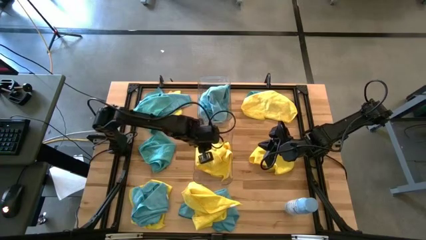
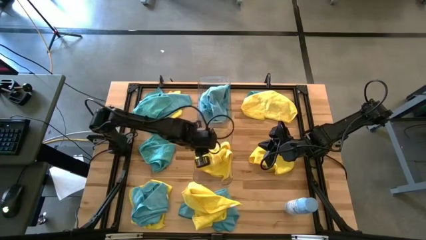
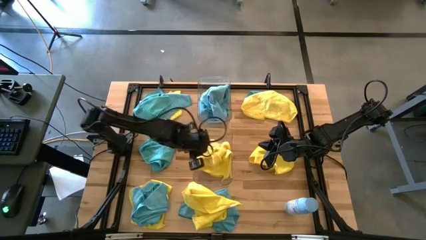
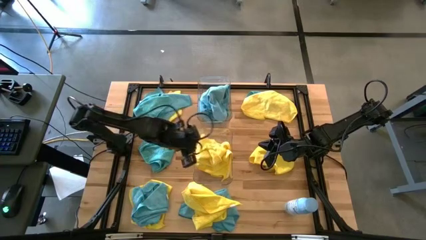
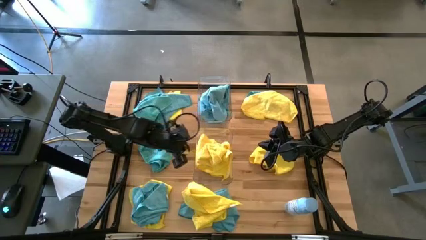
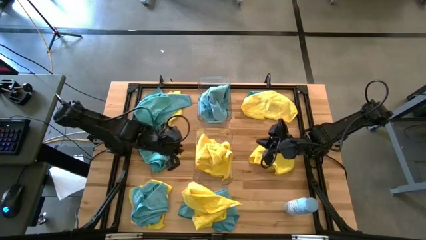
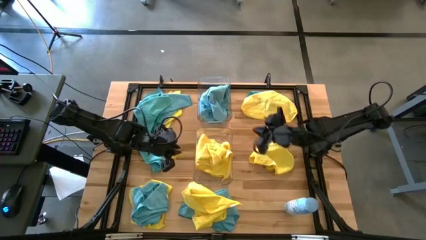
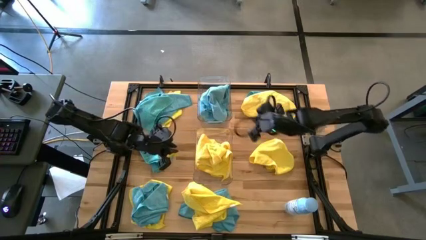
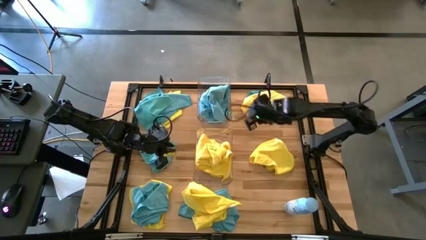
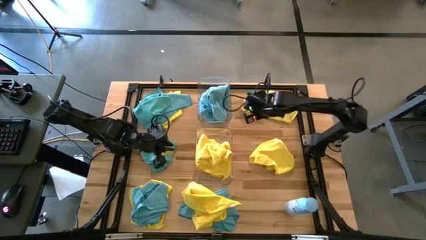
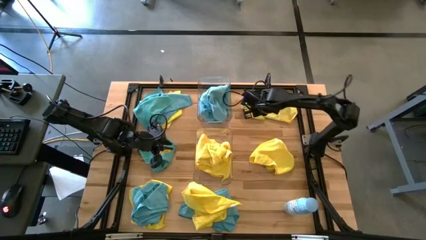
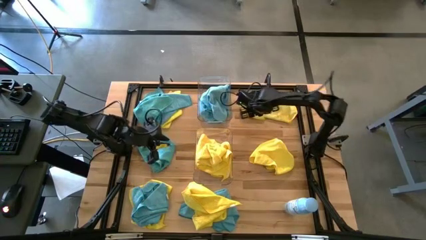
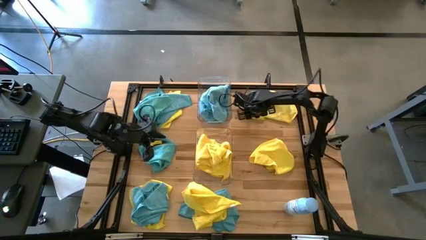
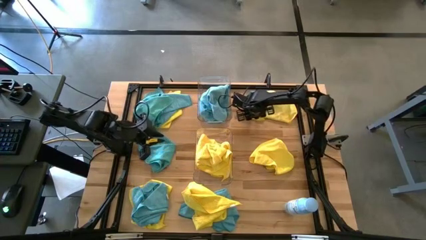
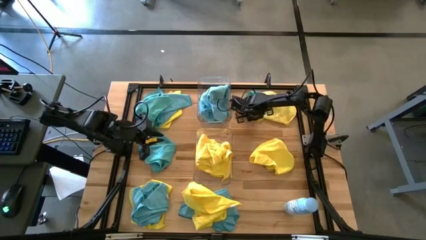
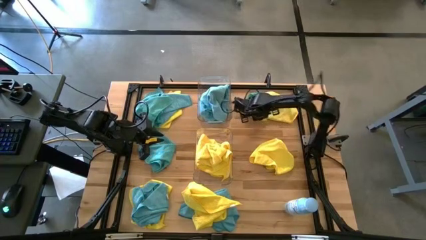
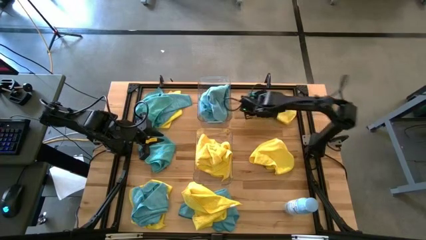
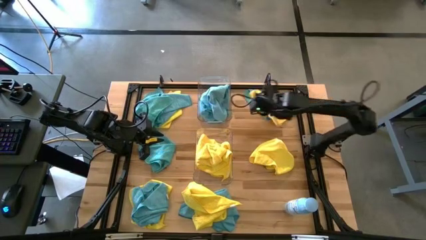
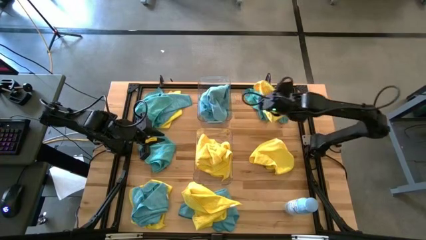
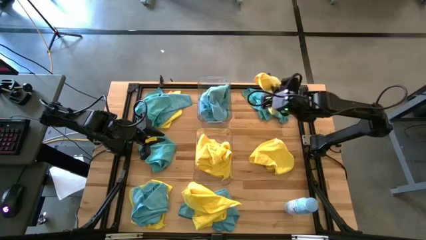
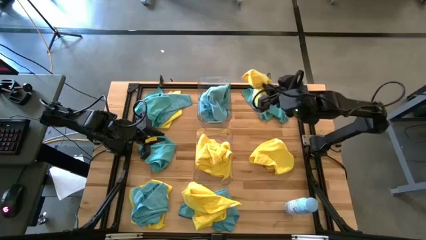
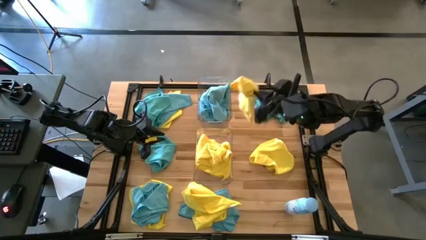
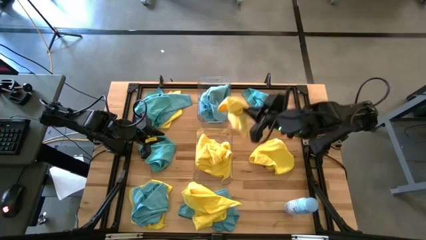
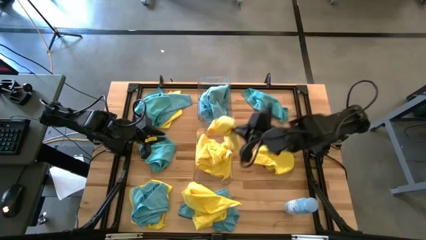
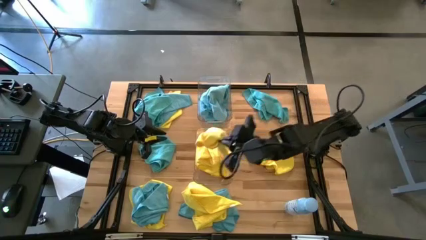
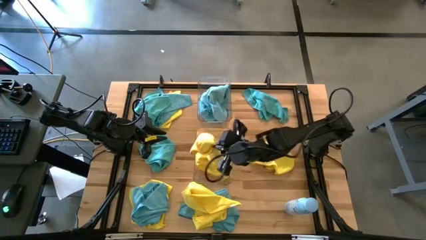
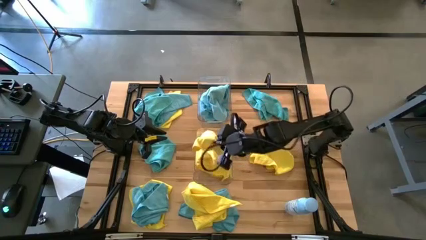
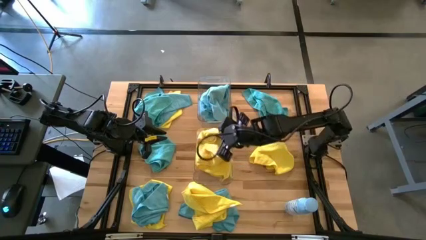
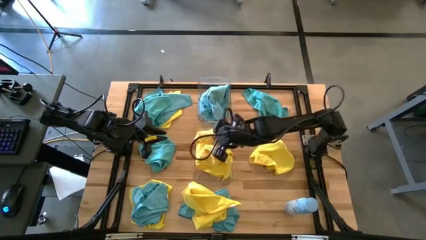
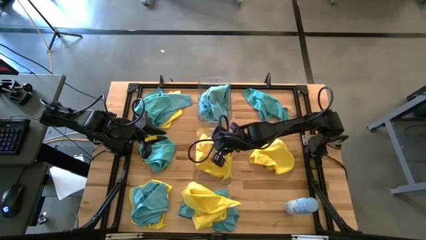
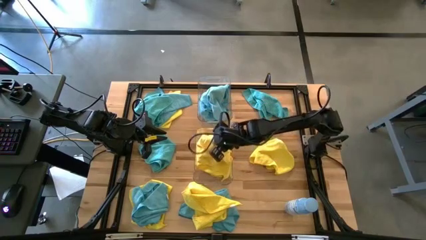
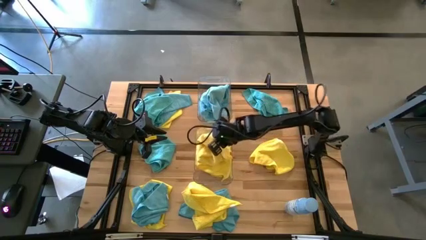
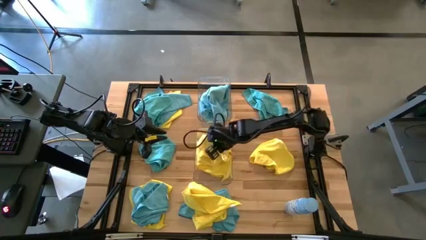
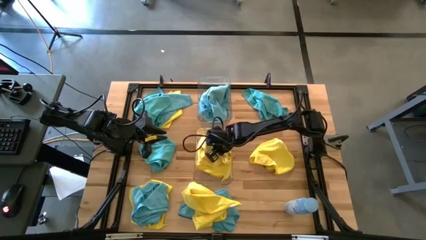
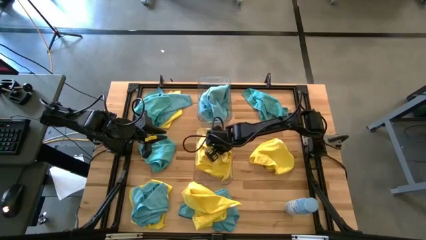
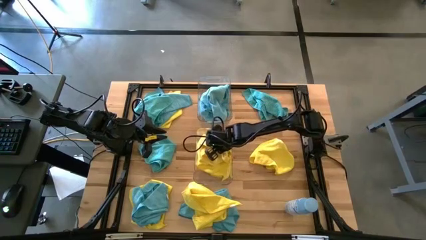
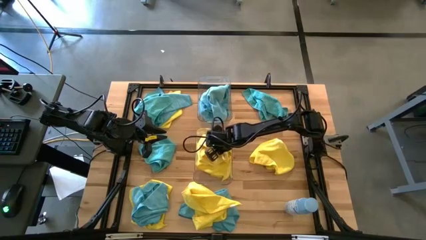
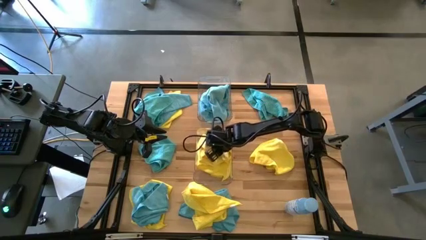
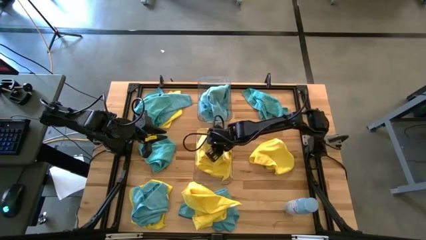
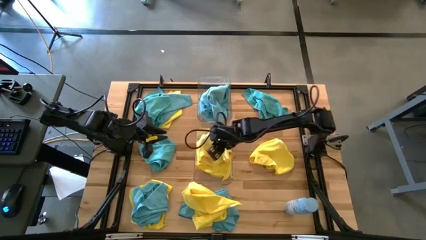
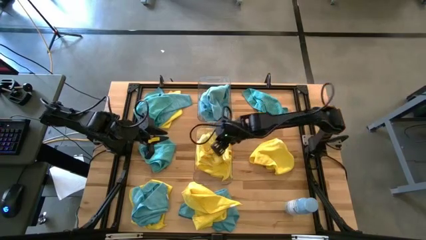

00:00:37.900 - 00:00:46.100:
Task: Sort microfiber towel by color & place in baskets
Put the yellow towel into the bottom transparent bin

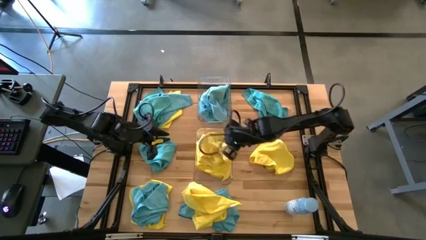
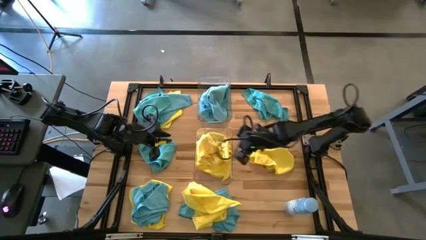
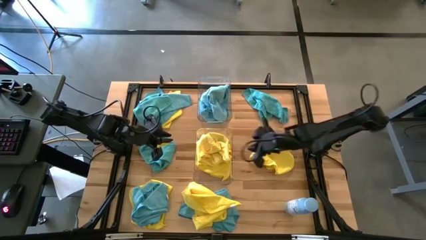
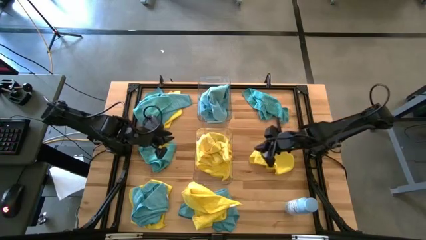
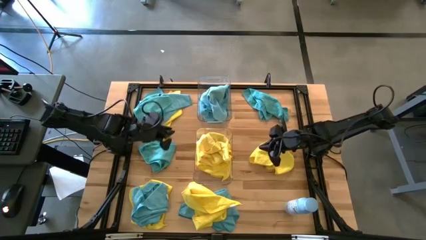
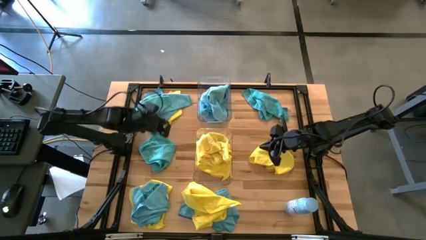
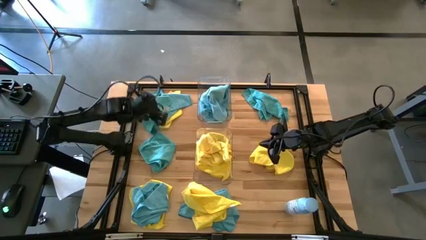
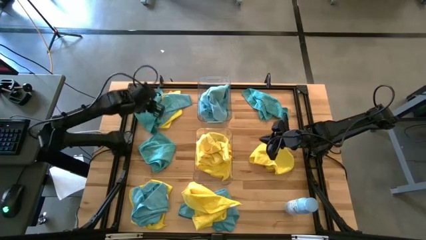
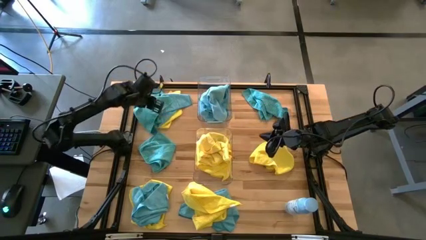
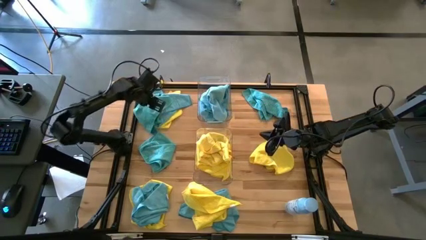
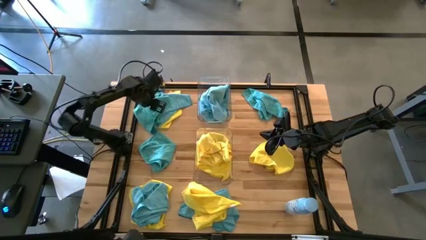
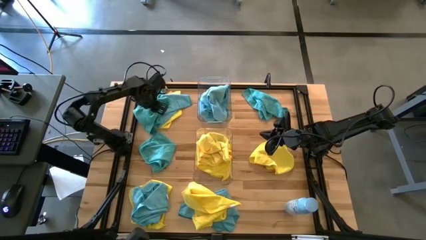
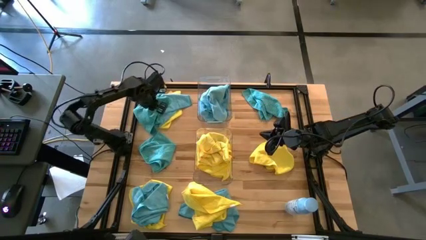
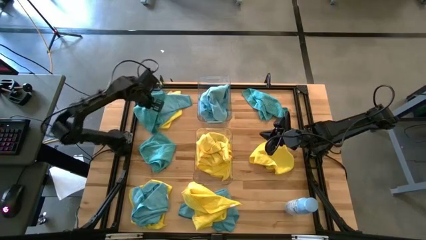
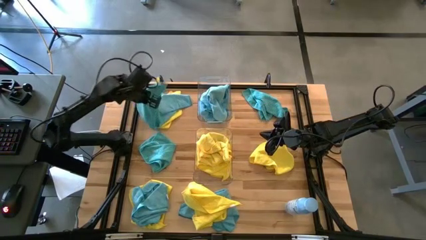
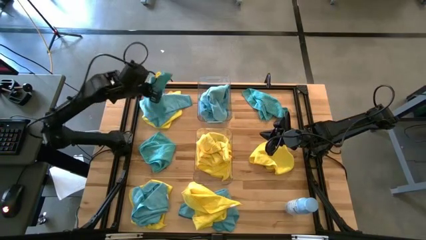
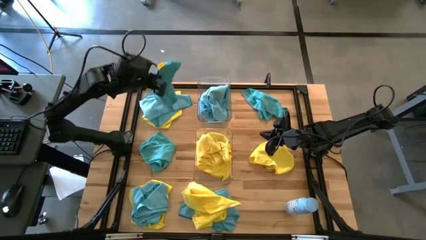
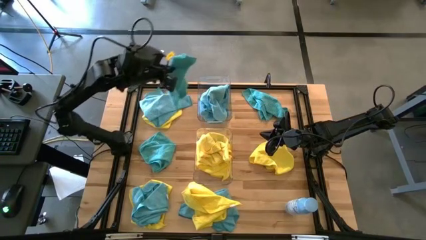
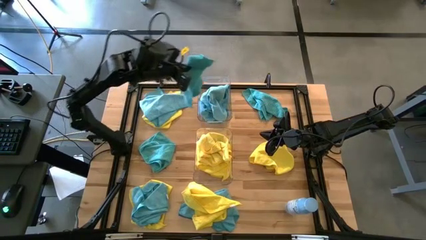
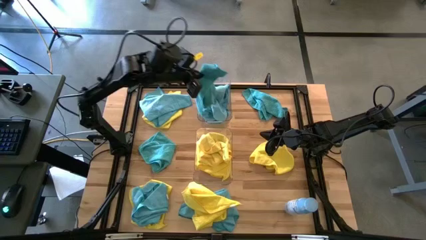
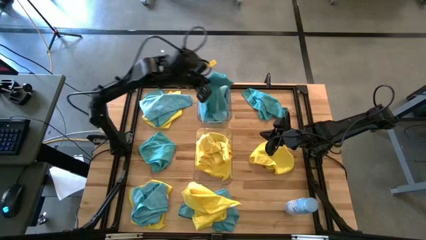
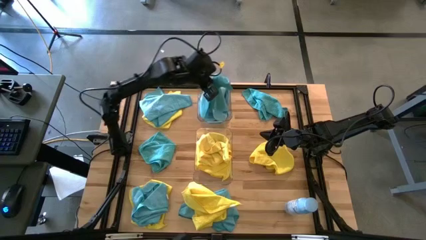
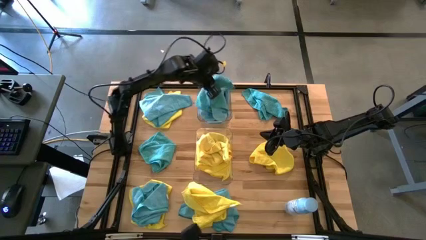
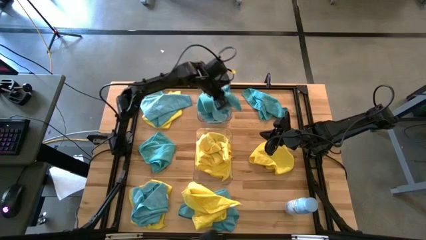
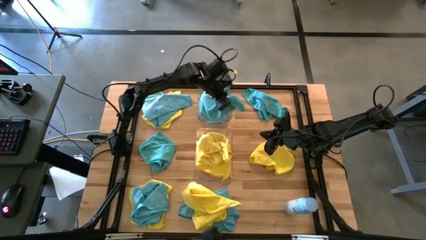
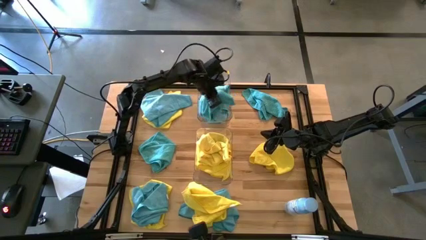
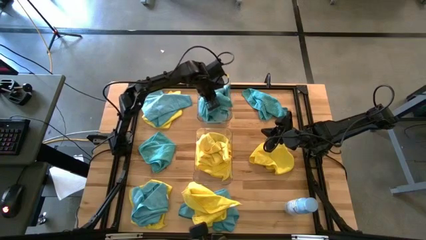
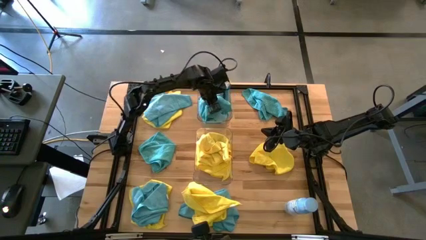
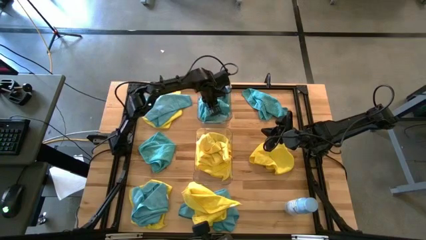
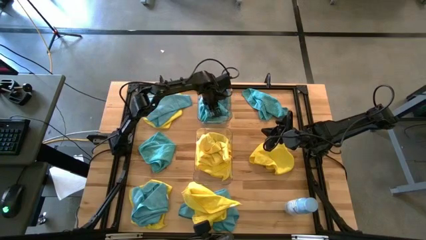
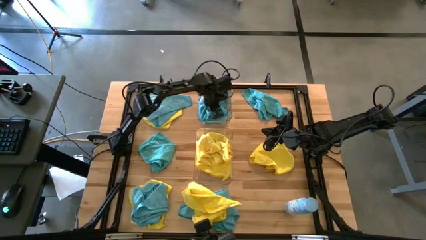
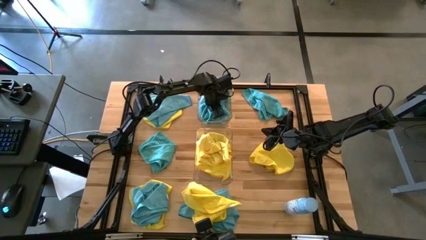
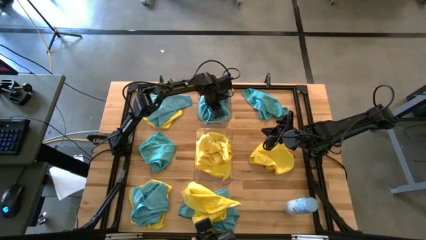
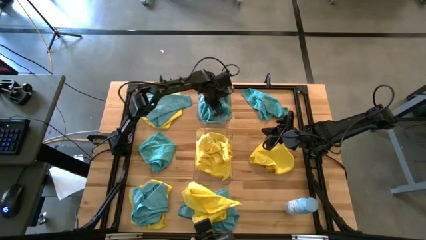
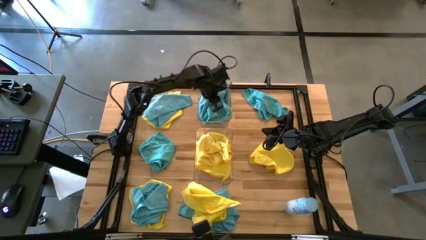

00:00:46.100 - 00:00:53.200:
Put the blue towel into the top transparent bin
